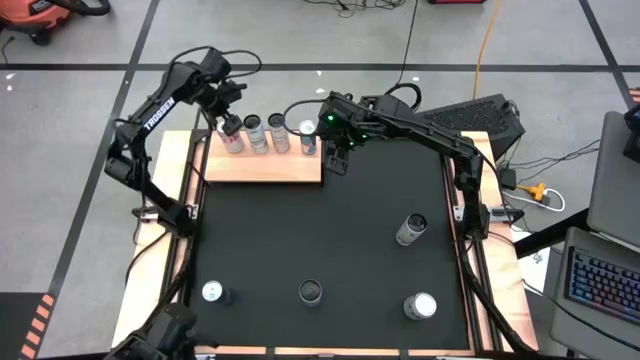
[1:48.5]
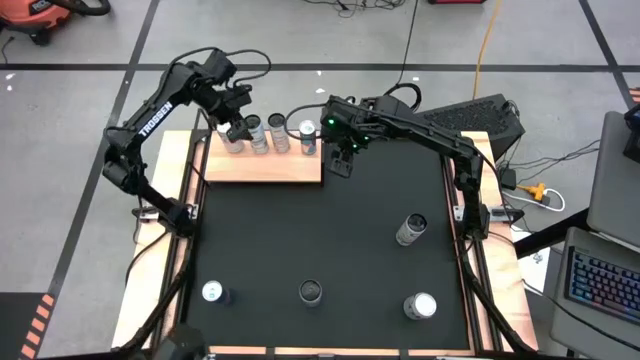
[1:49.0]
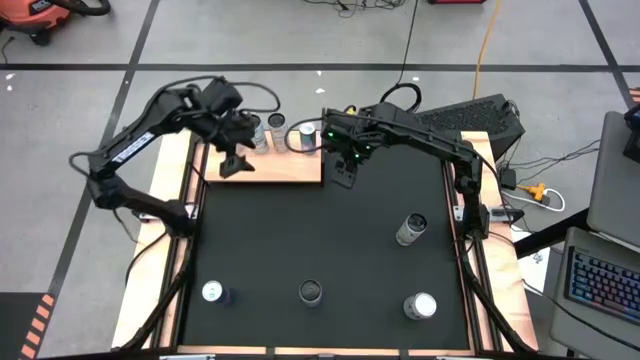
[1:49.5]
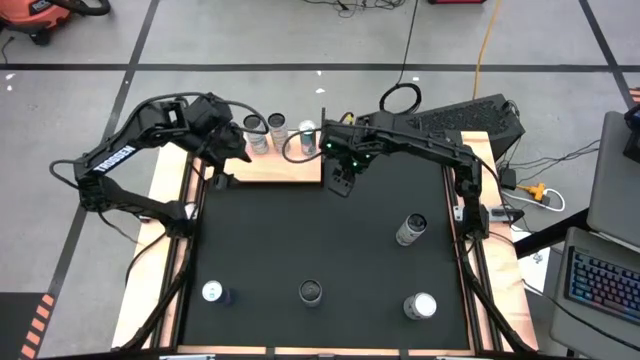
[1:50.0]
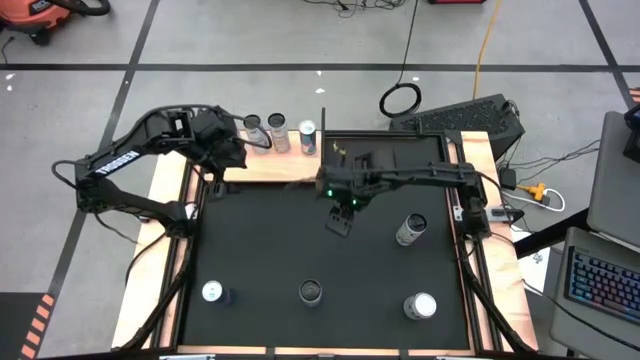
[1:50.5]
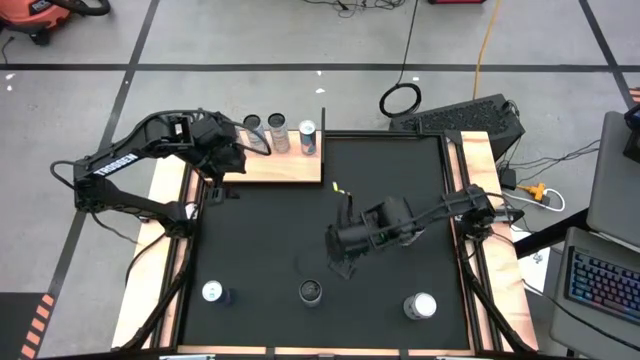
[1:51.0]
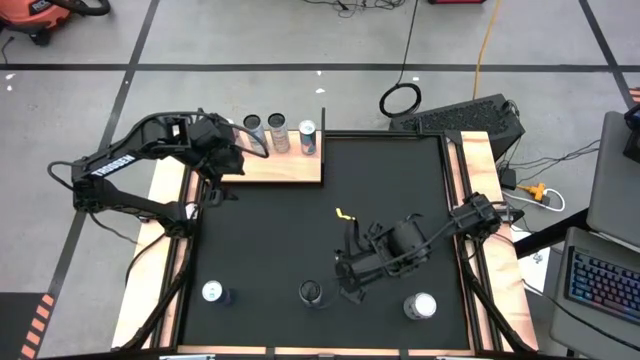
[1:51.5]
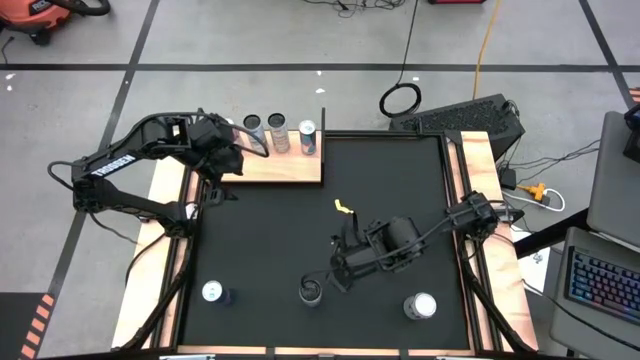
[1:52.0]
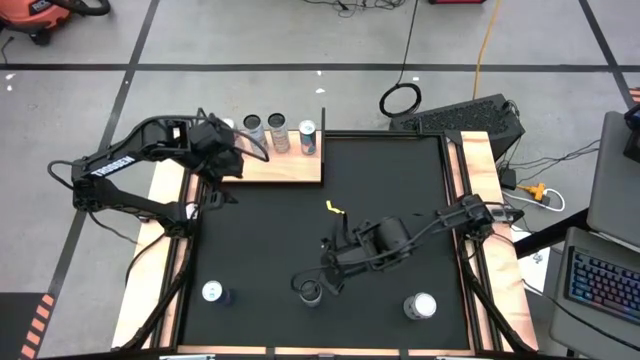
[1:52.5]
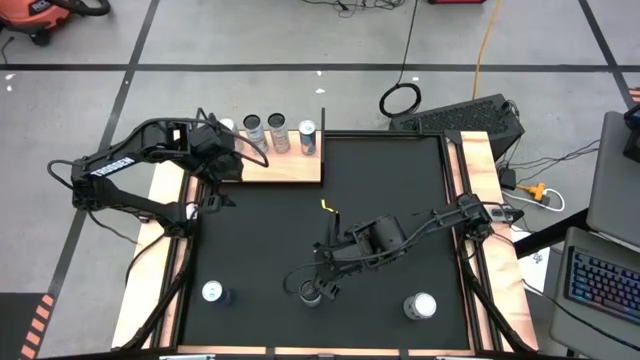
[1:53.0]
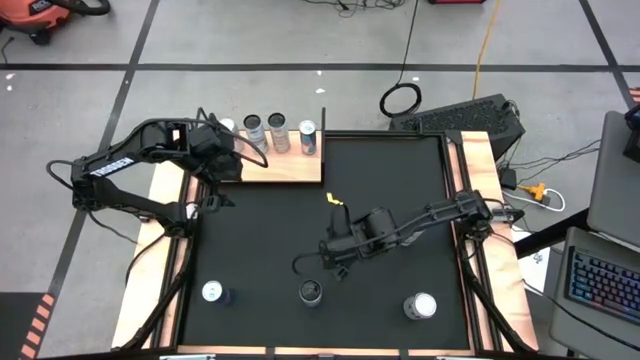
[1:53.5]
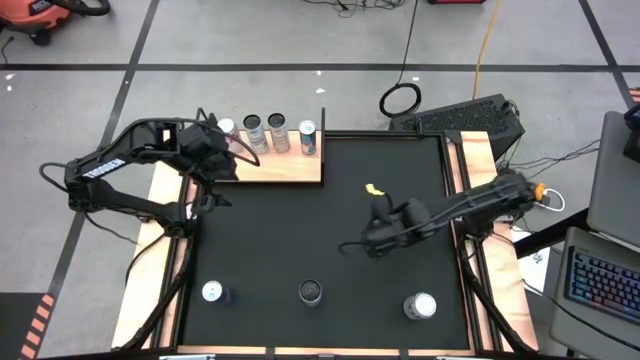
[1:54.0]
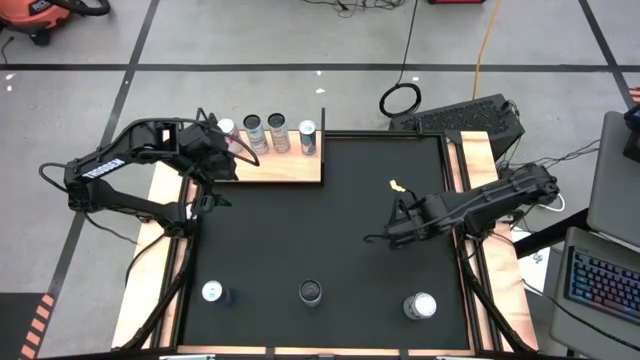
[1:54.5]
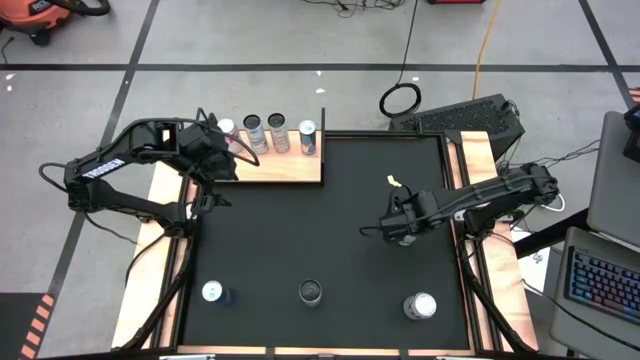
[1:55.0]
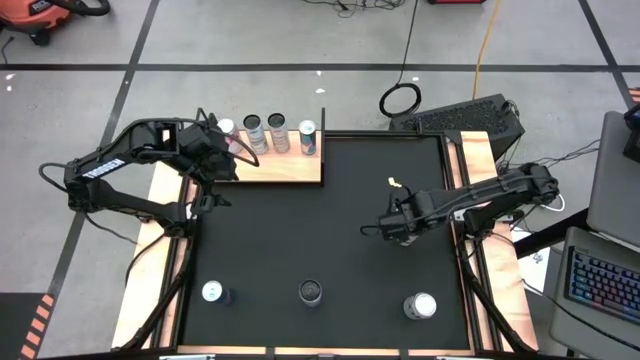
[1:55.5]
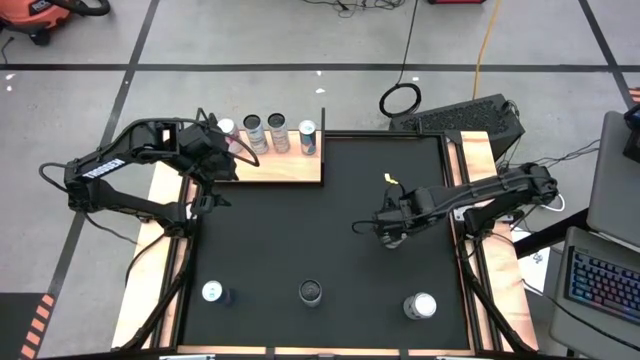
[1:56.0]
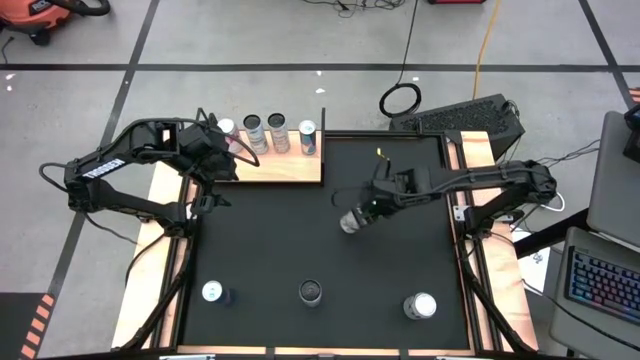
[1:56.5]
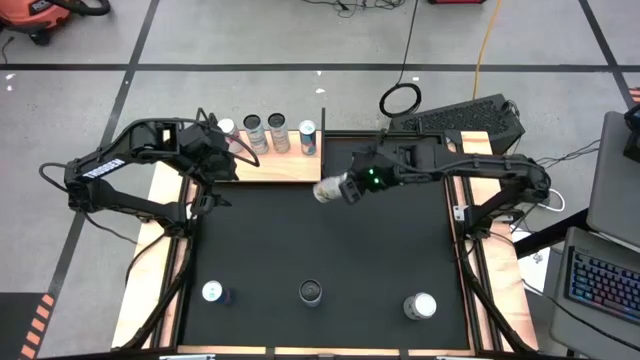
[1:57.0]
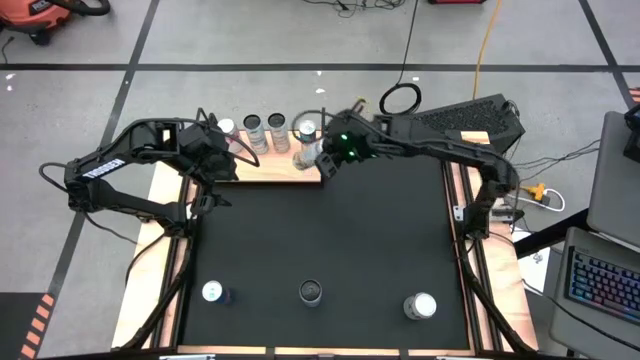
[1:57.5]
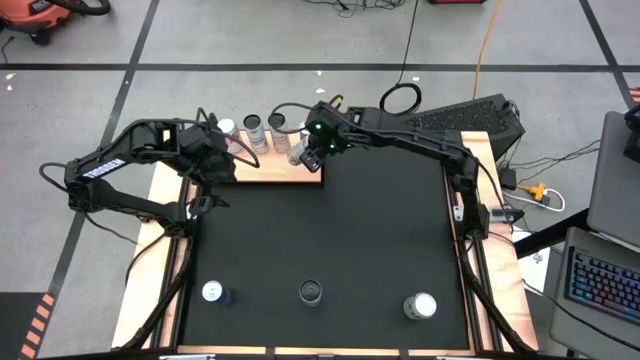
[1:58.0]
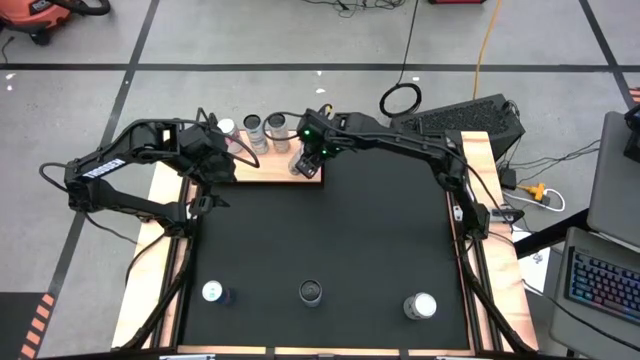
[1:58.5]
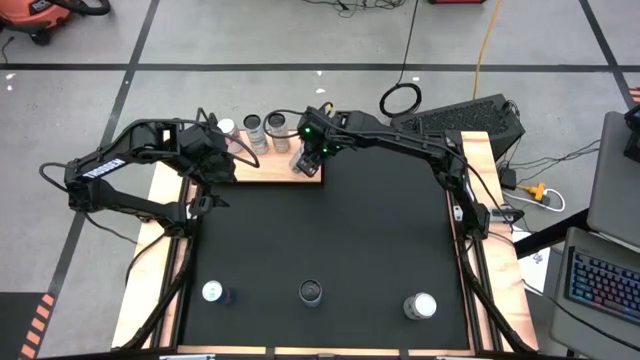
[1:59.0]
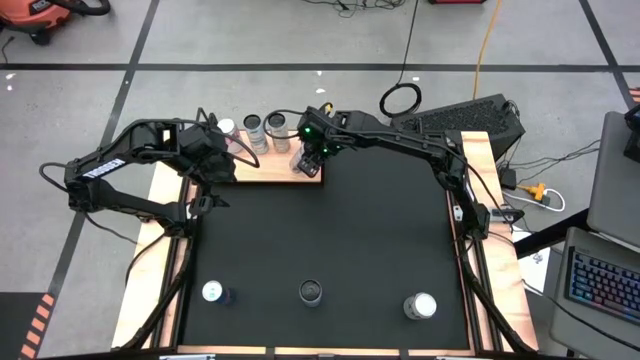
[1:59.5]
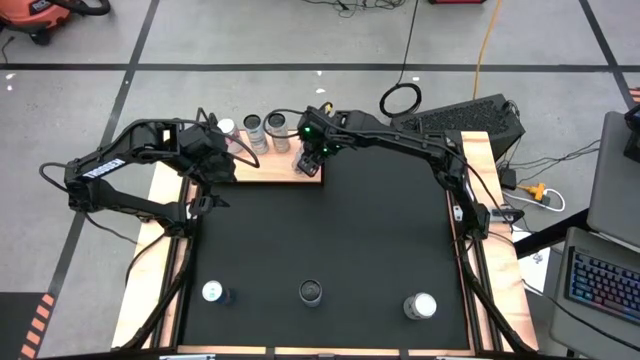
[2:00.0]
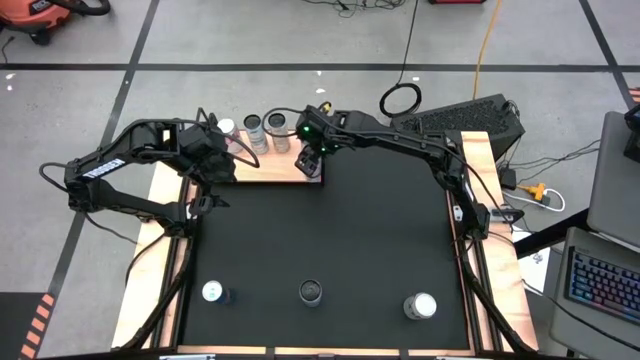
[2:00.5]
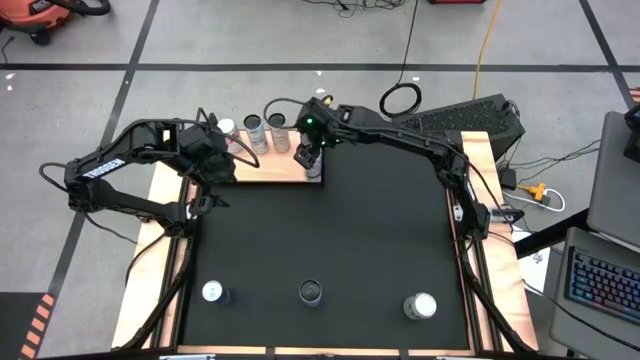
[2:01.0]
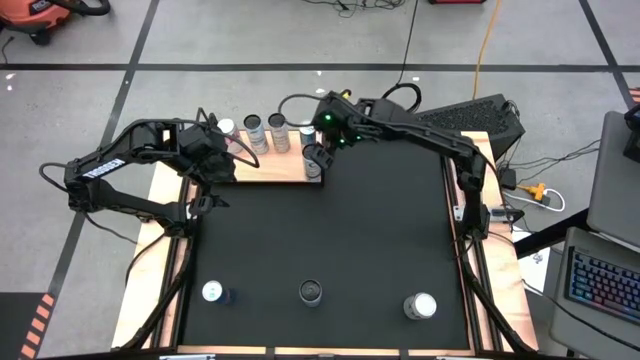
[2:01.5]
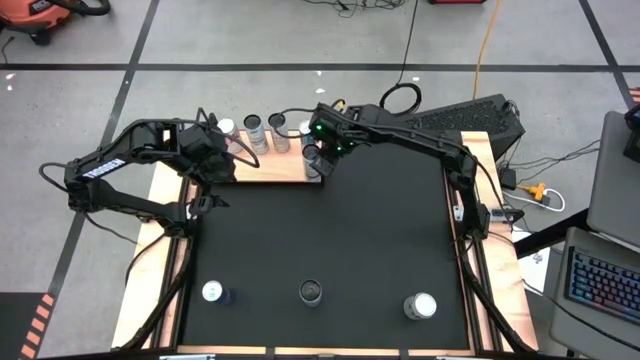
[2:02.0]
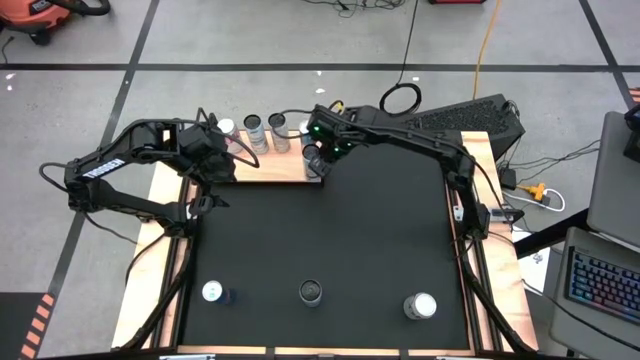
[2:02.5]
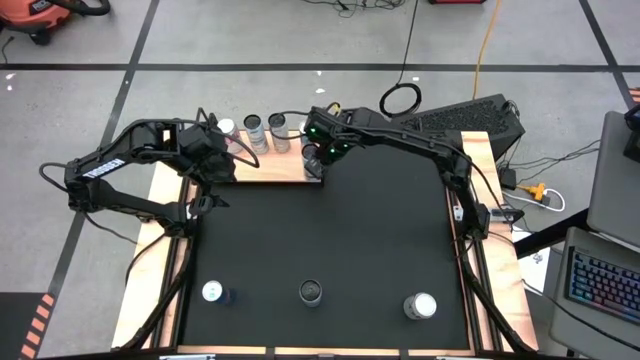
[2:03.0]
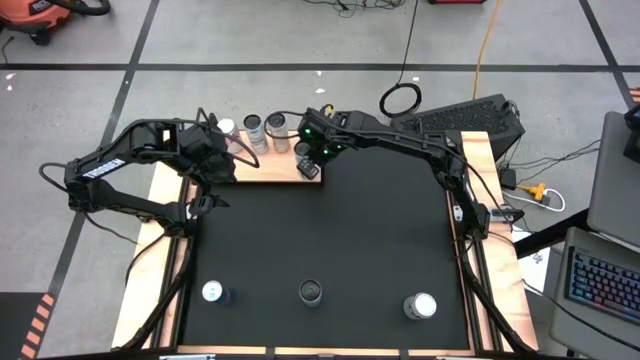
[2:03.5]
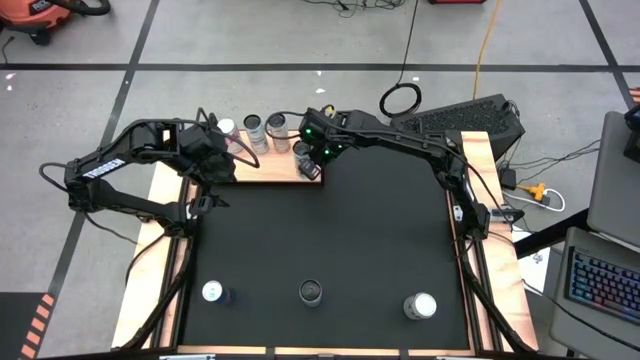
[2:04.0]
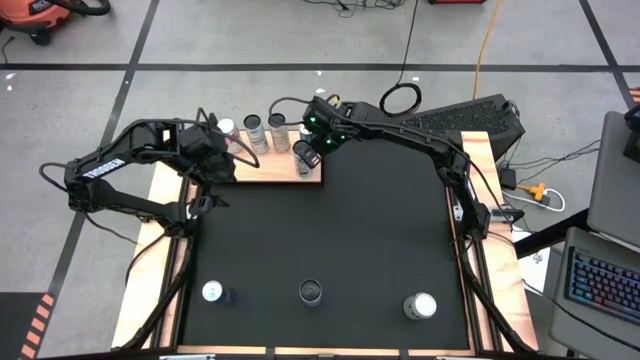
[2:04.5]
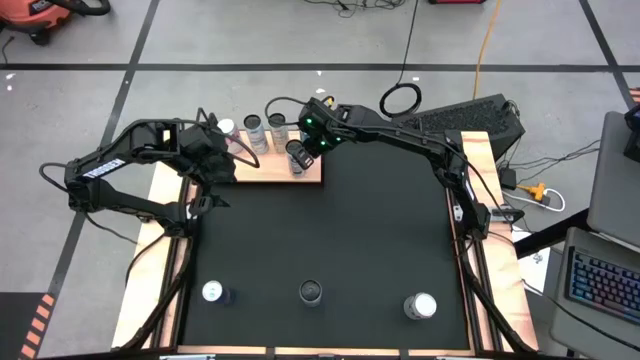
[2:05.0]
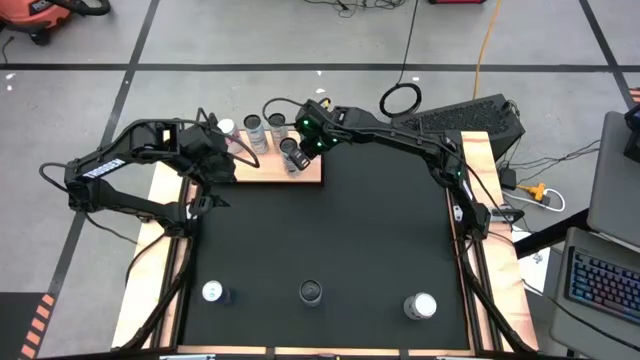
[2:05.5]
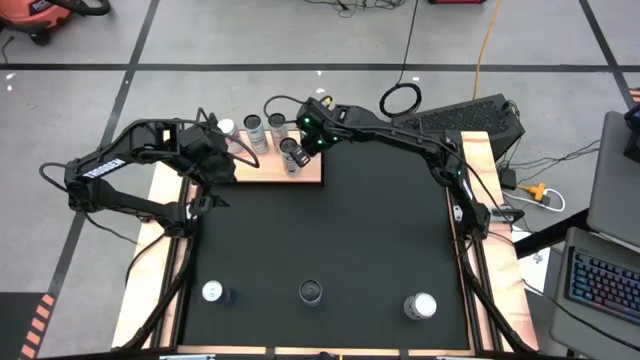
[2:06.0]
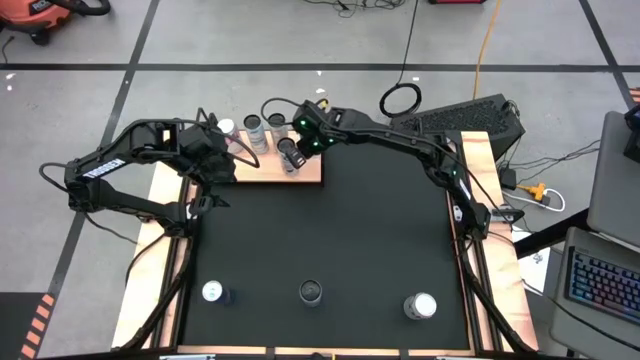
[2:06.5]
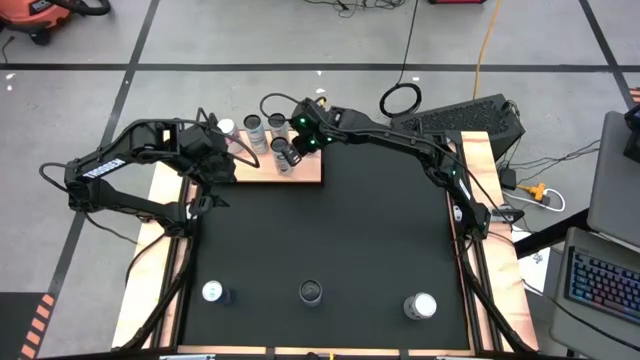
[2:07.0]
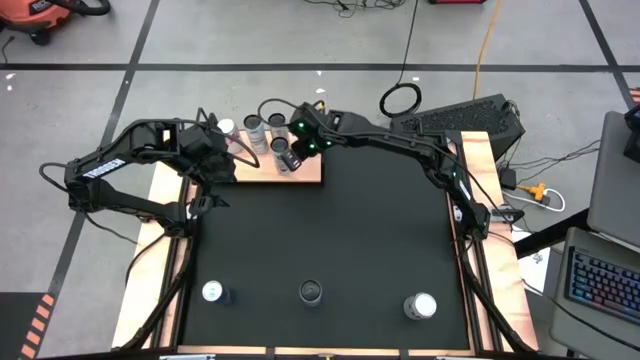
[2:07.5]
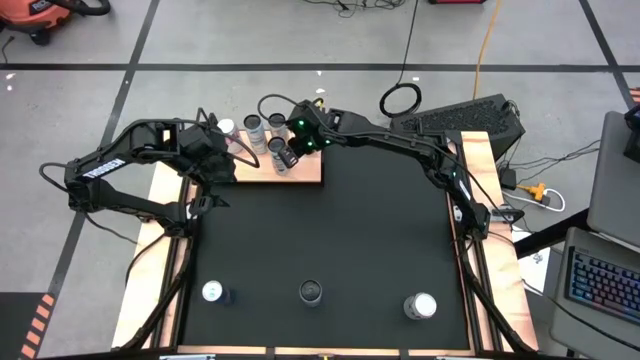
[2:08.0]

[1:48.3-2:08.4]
Task: Place canned beverage on shelf
Put the white yellow soda can on the shelf aligned with the white yellow soda can
